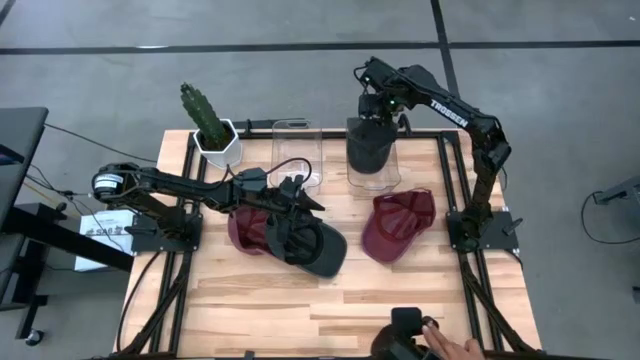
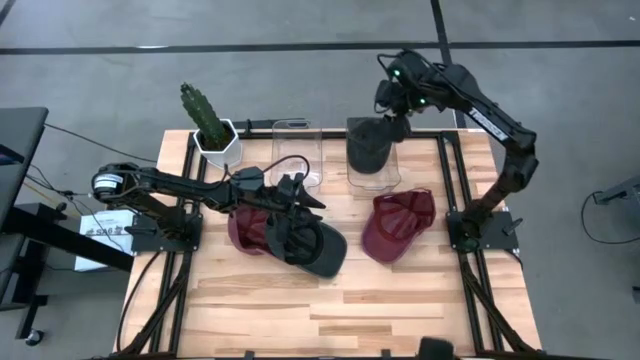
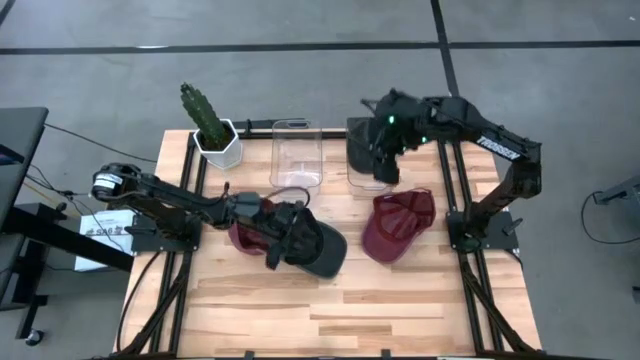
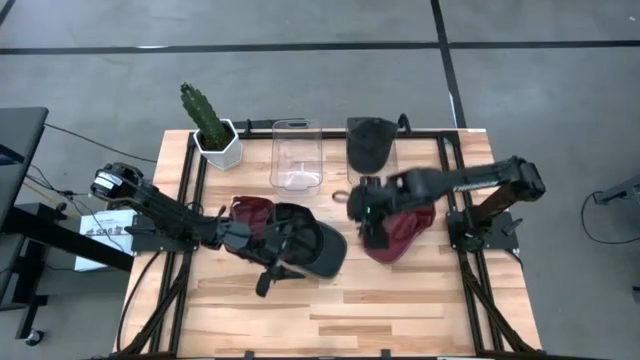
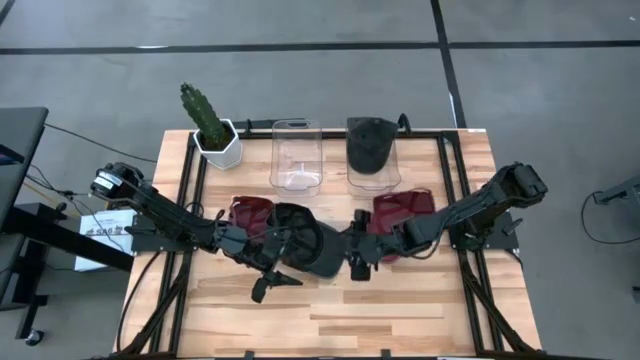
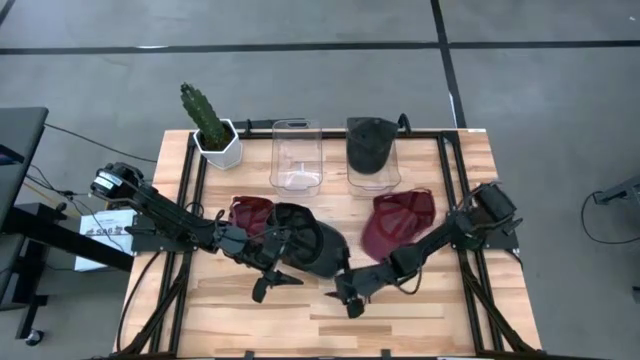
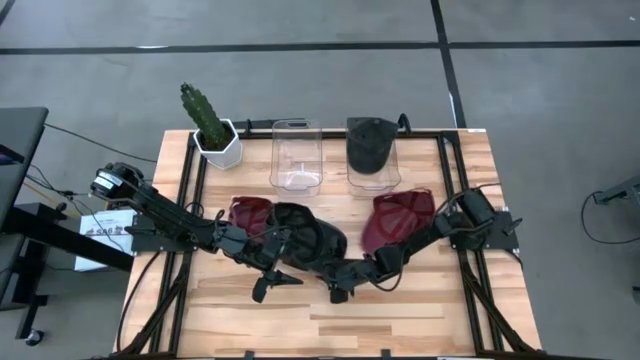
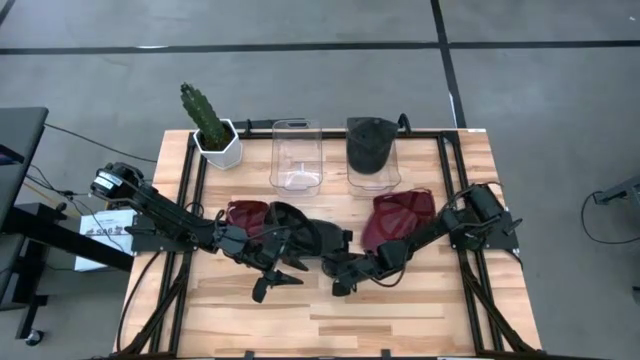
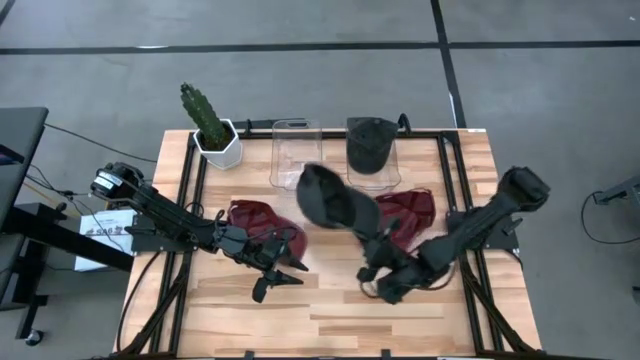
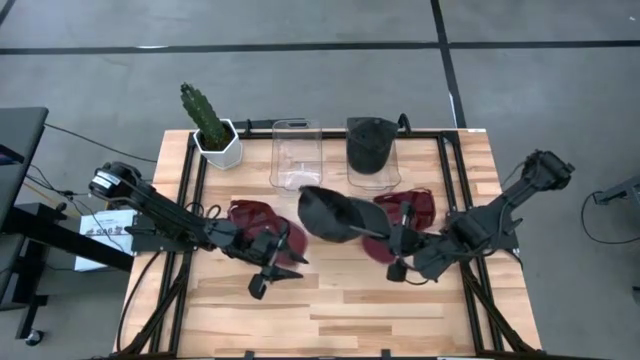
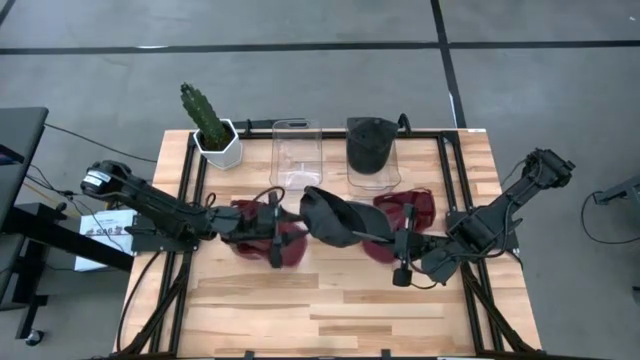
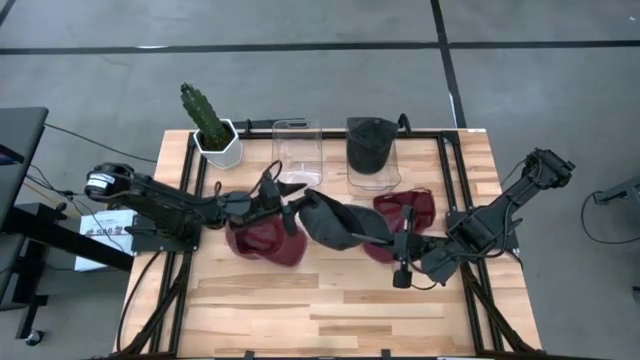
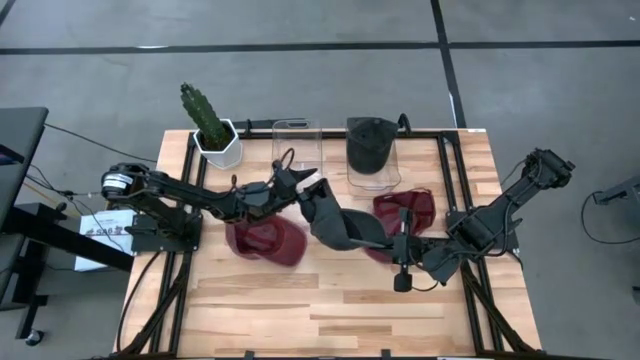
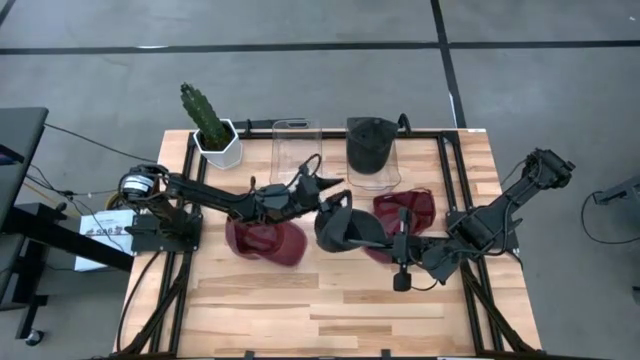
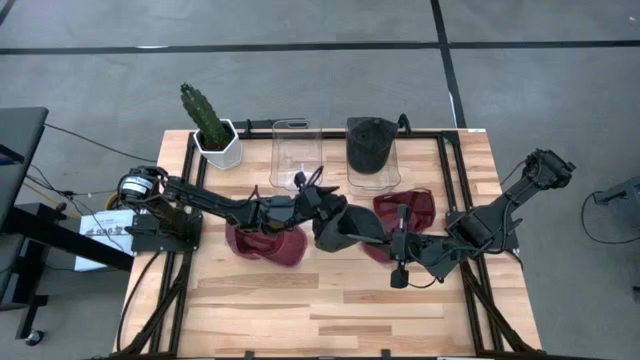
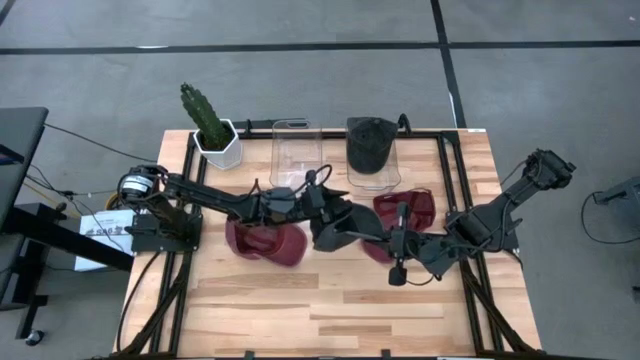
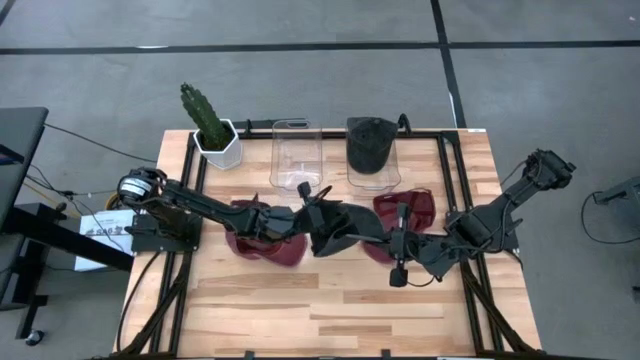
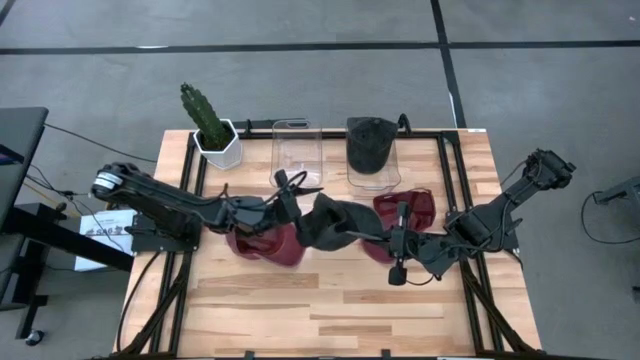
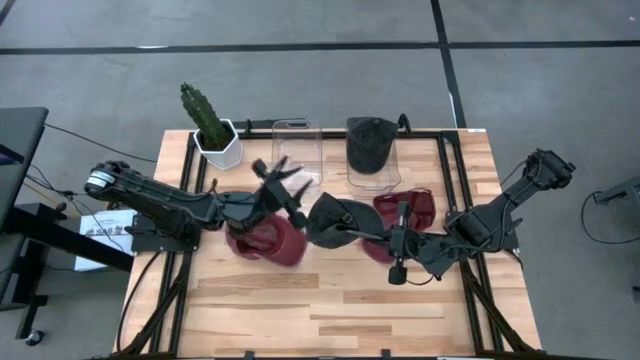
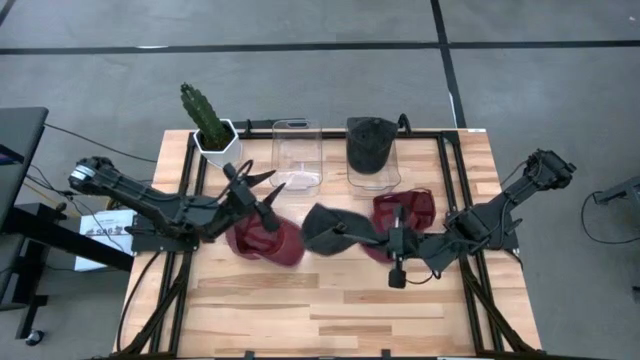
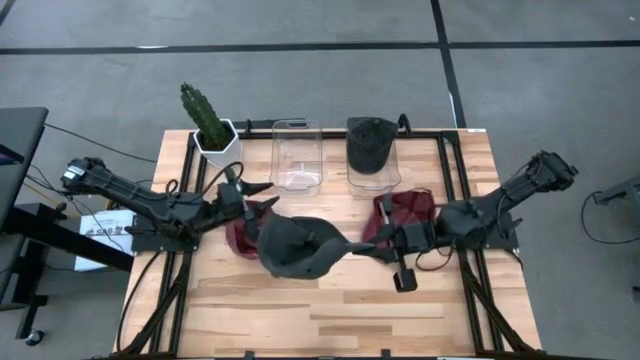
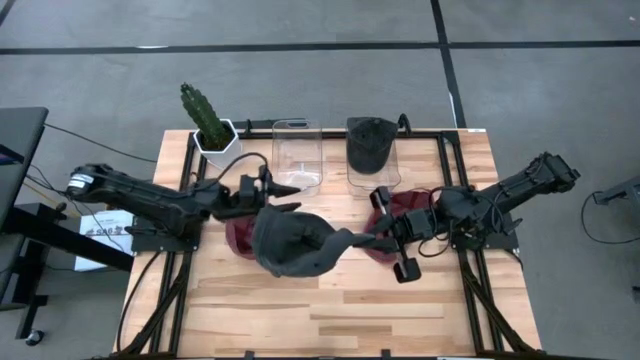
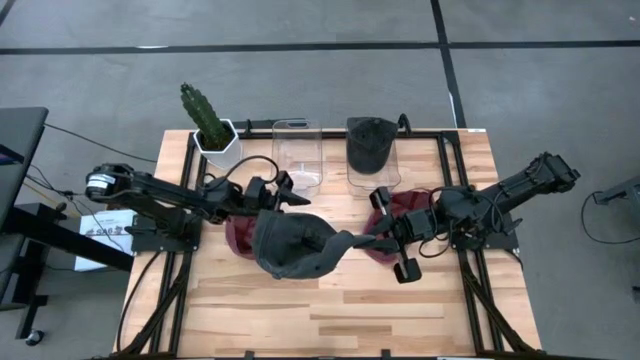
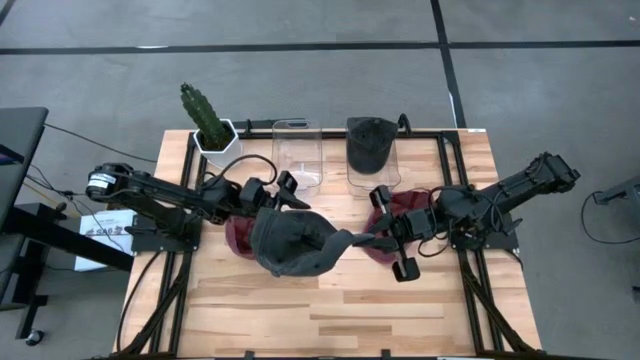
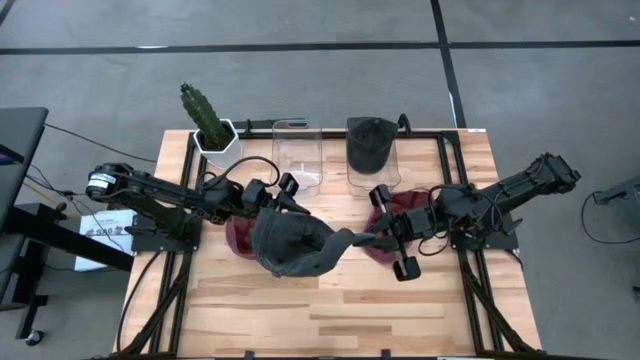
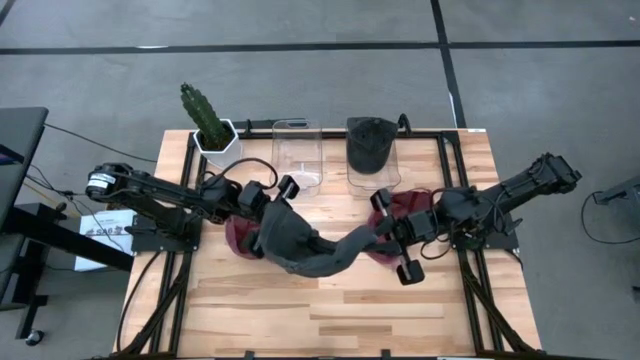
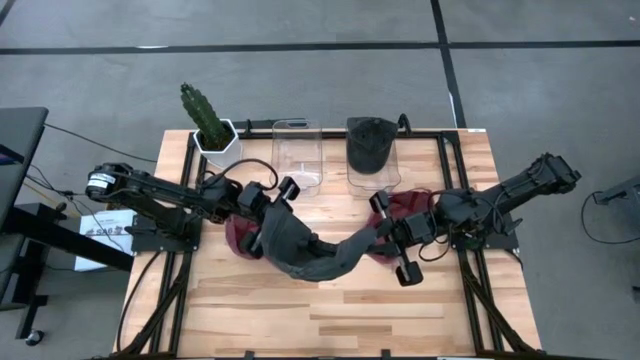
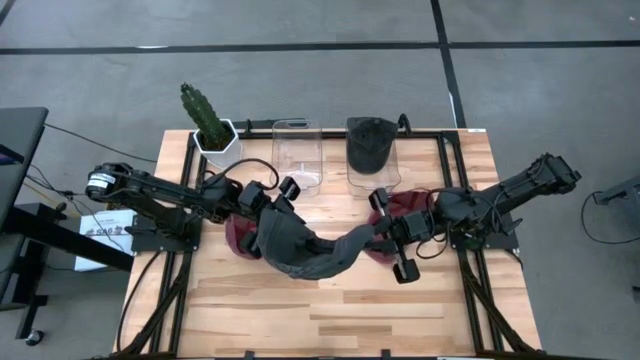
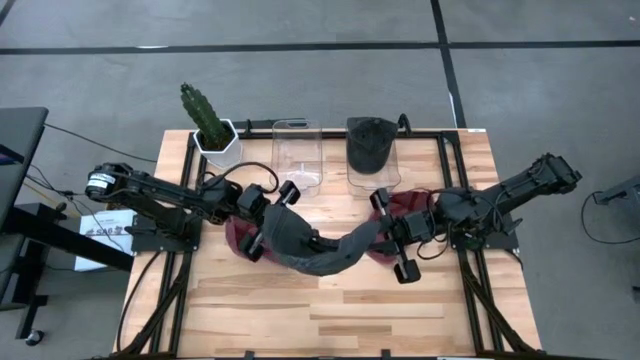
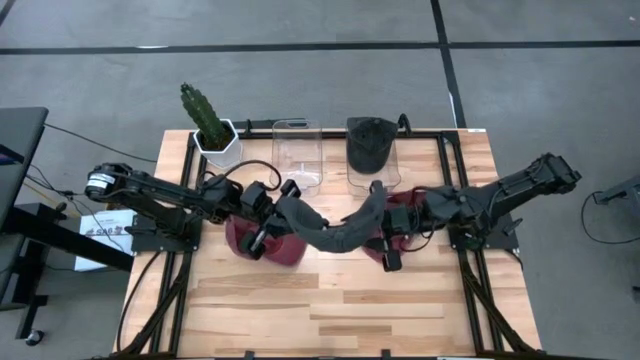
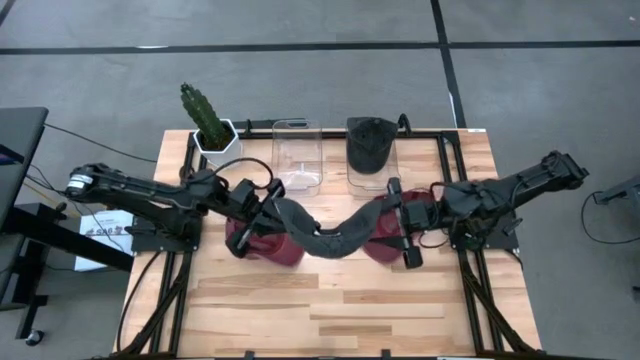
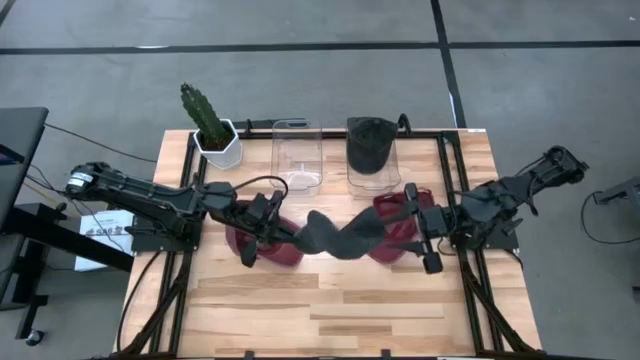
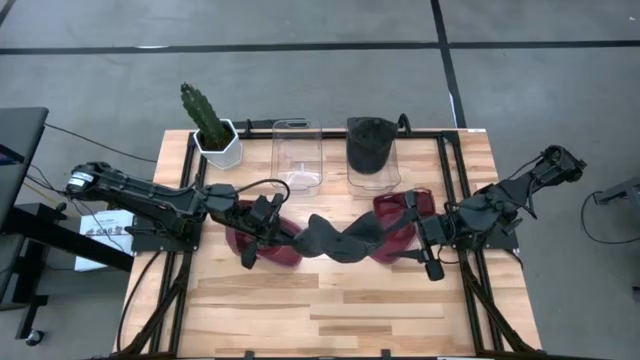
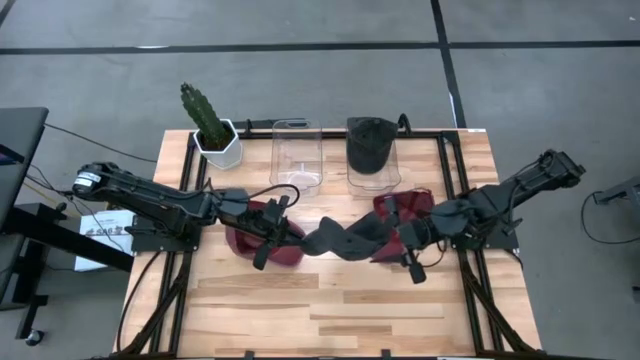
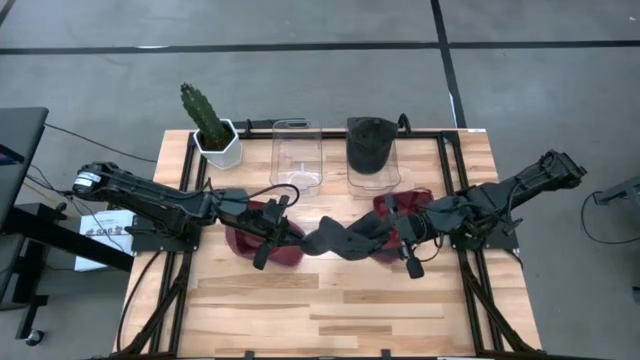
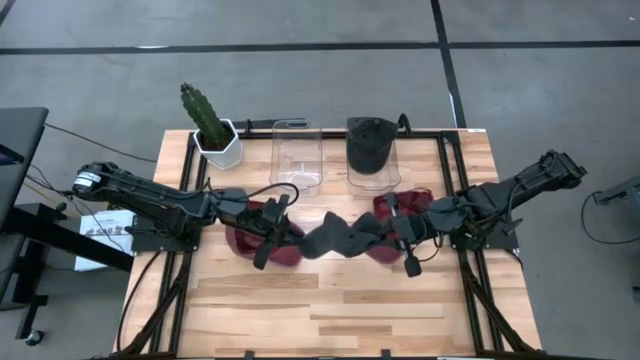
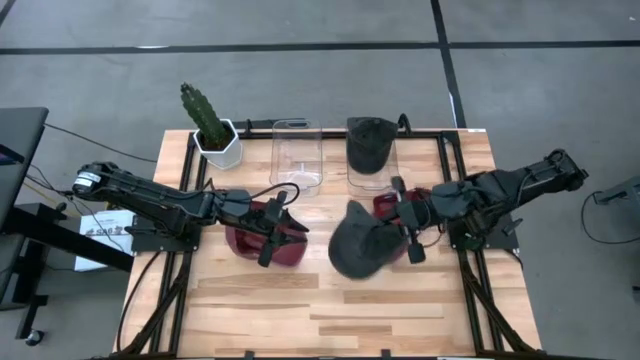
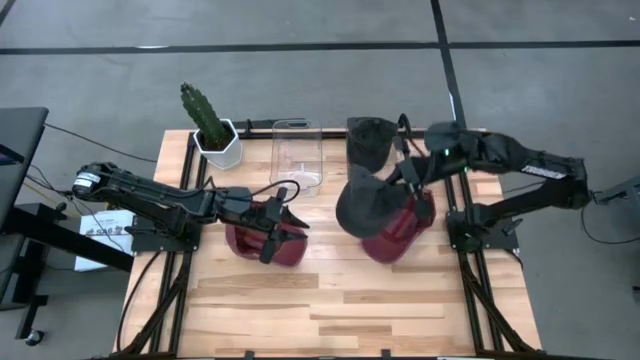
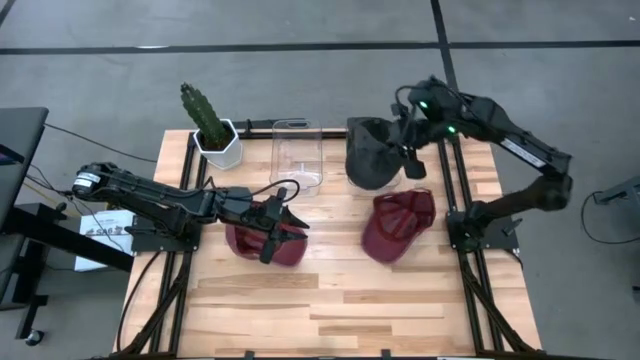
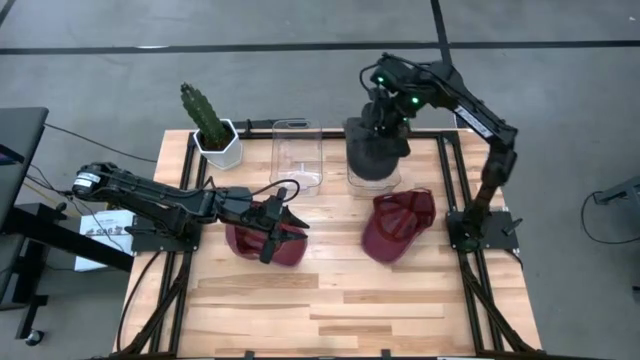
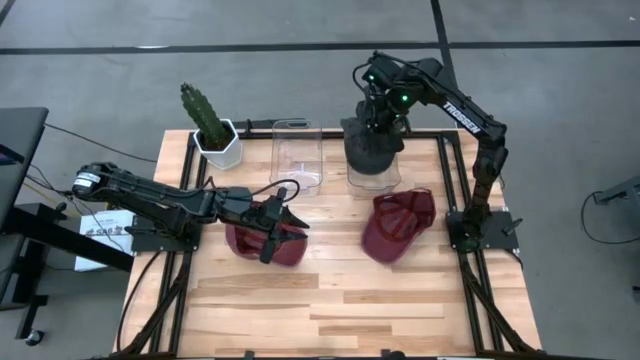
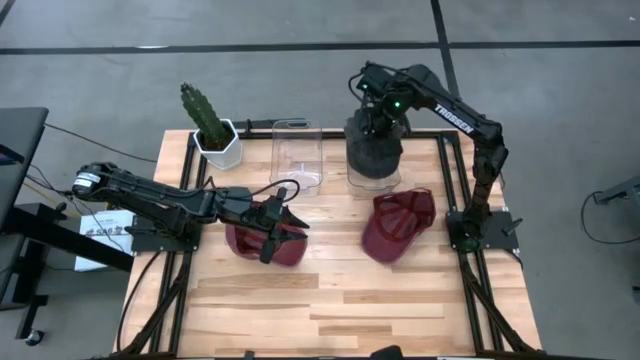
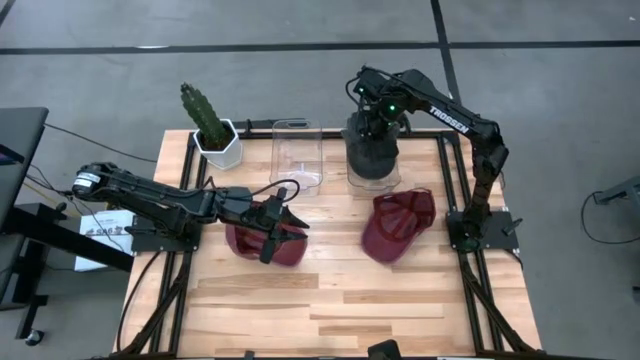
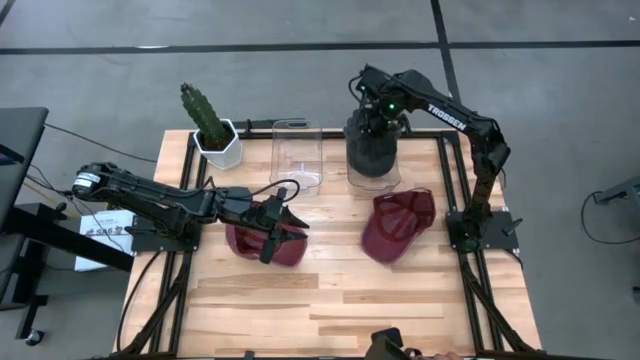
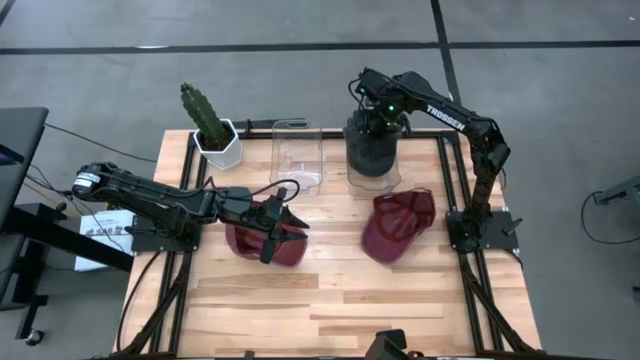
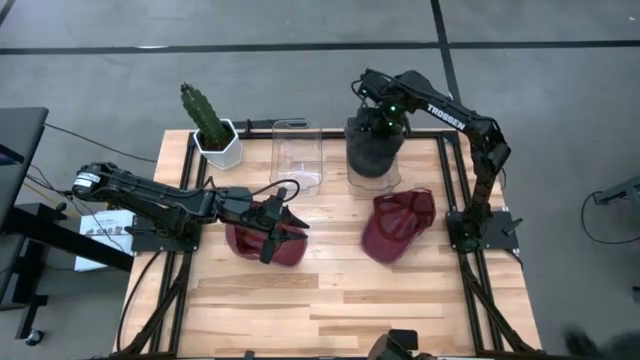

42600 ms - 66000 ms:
Task: Pick & Place hat
Put the black cap into the transparent bin
